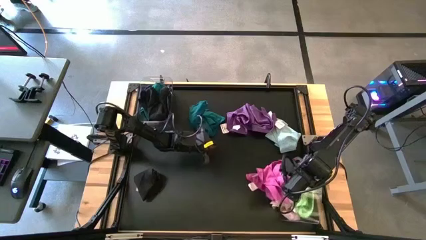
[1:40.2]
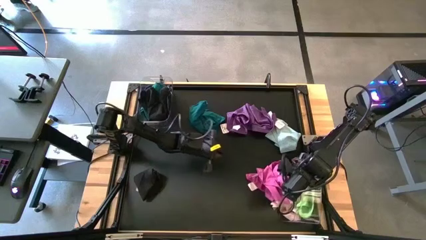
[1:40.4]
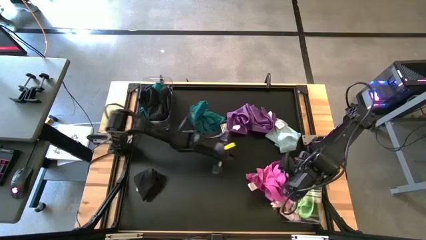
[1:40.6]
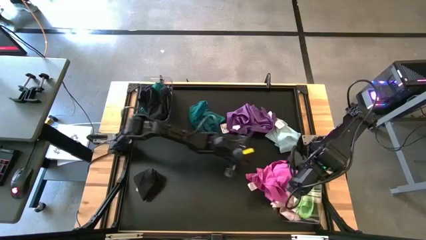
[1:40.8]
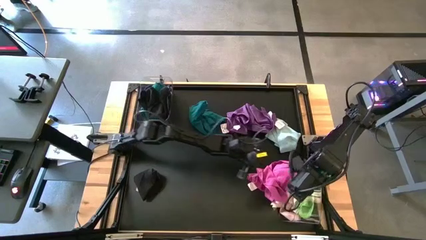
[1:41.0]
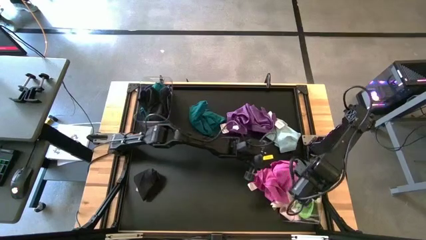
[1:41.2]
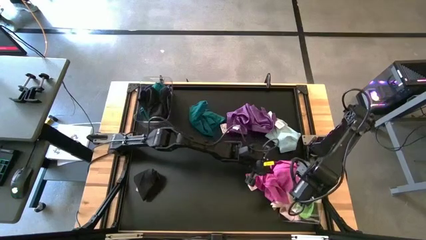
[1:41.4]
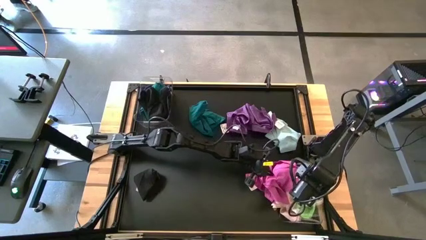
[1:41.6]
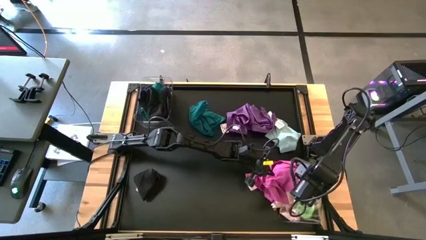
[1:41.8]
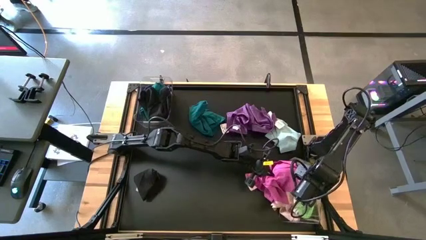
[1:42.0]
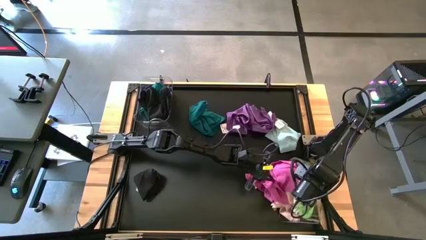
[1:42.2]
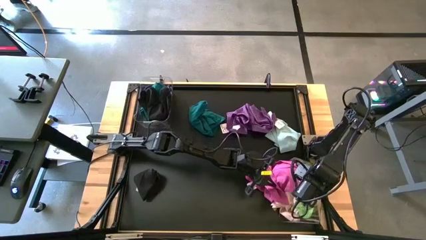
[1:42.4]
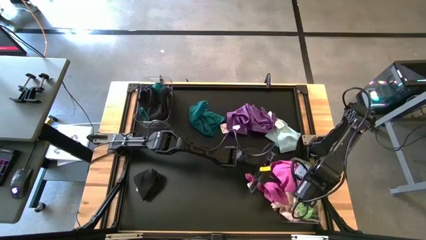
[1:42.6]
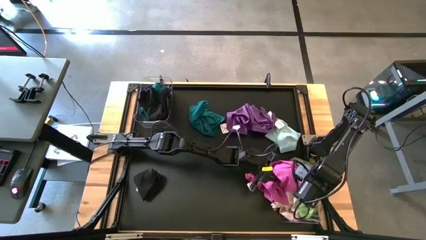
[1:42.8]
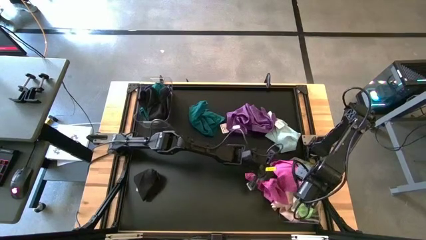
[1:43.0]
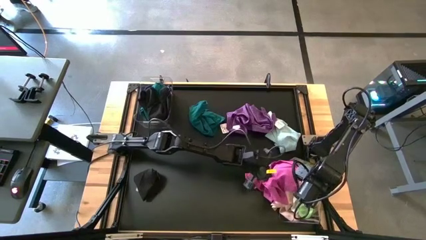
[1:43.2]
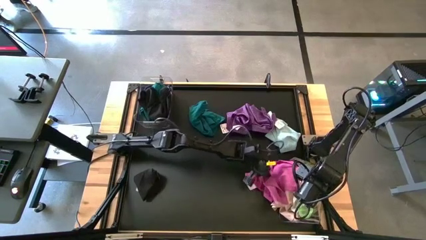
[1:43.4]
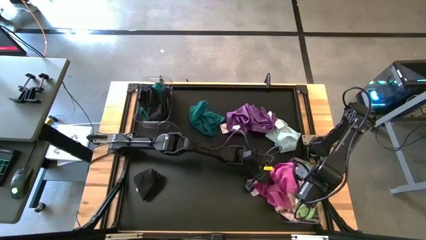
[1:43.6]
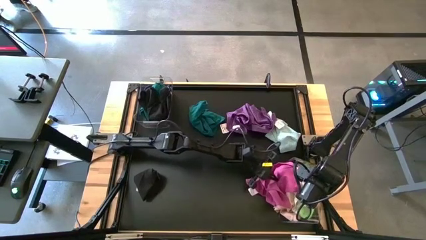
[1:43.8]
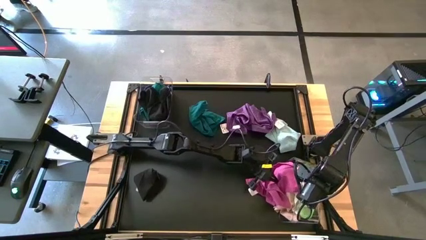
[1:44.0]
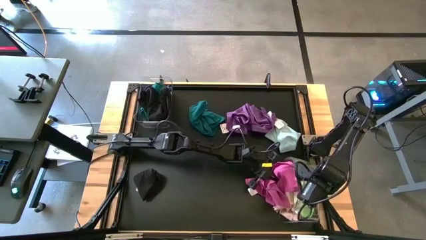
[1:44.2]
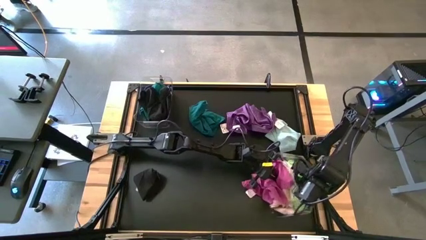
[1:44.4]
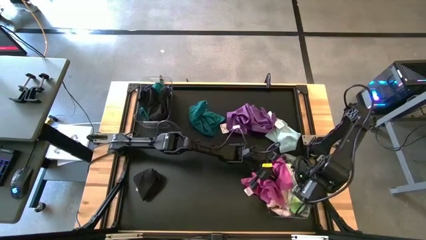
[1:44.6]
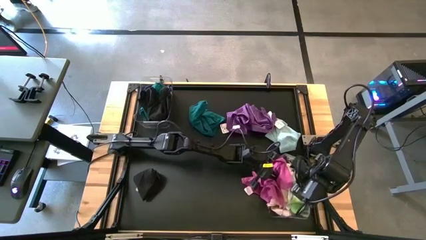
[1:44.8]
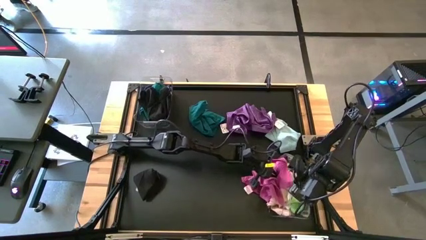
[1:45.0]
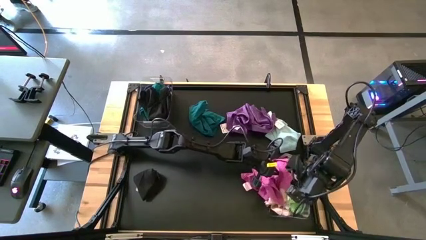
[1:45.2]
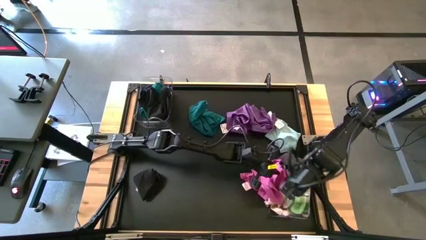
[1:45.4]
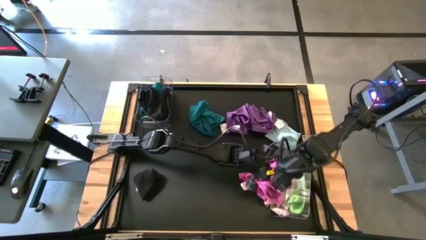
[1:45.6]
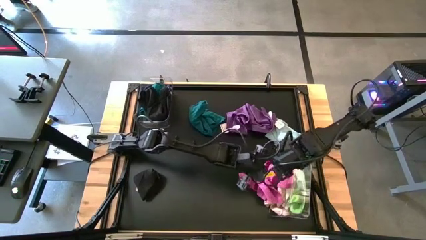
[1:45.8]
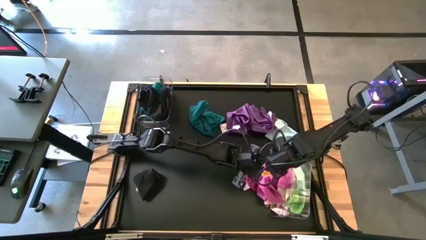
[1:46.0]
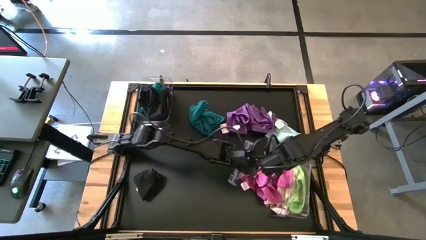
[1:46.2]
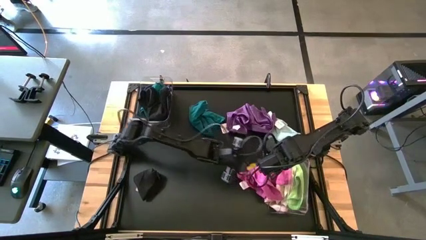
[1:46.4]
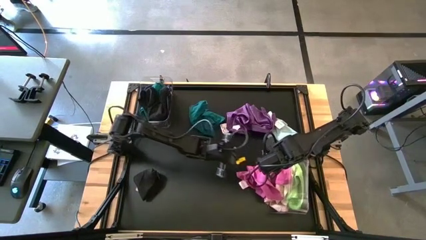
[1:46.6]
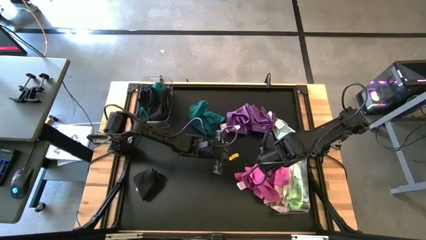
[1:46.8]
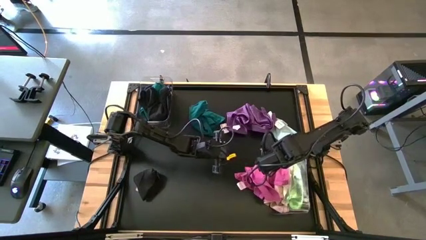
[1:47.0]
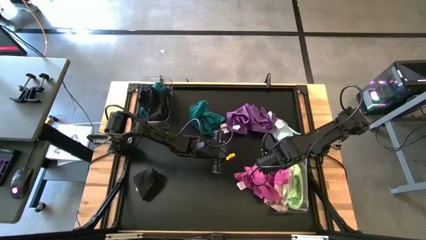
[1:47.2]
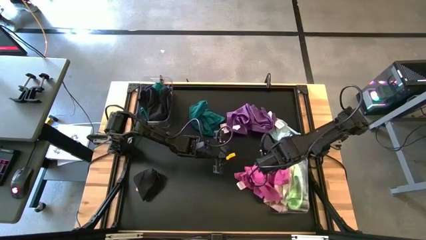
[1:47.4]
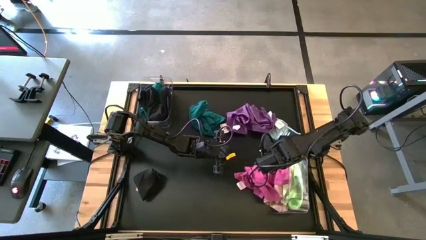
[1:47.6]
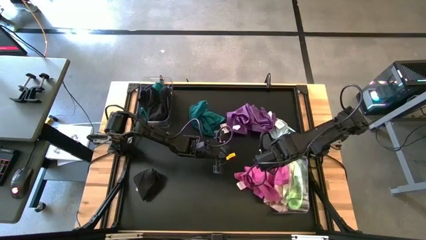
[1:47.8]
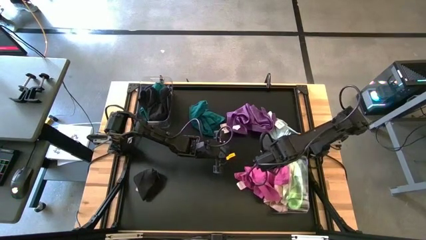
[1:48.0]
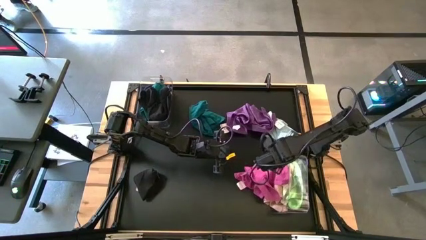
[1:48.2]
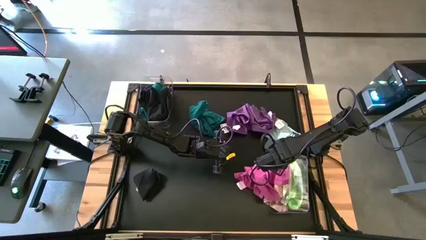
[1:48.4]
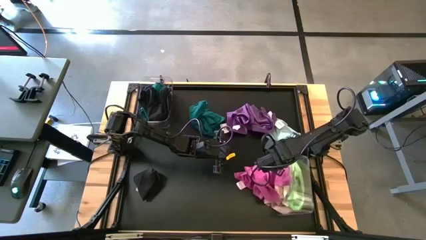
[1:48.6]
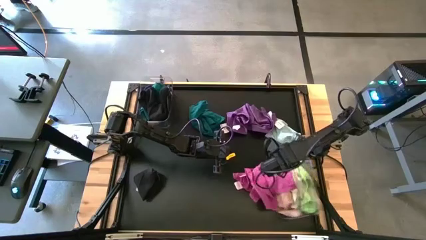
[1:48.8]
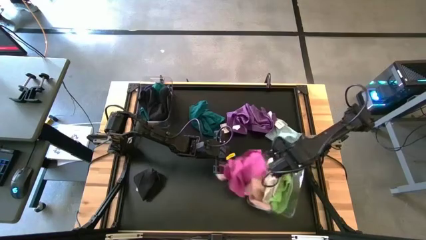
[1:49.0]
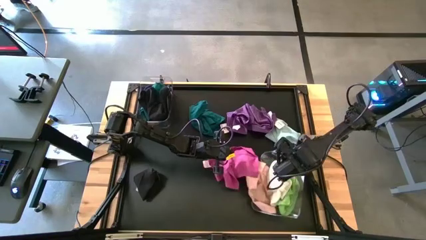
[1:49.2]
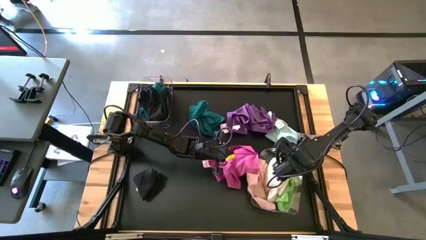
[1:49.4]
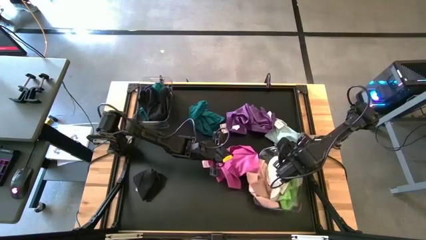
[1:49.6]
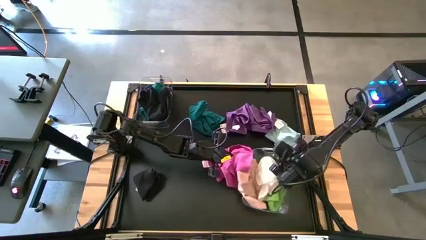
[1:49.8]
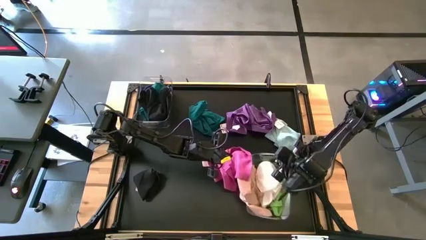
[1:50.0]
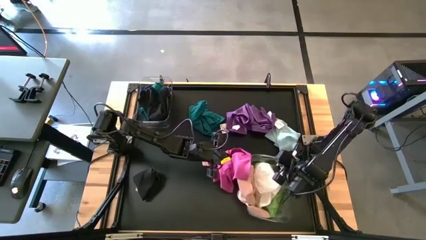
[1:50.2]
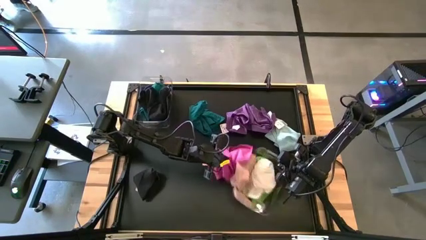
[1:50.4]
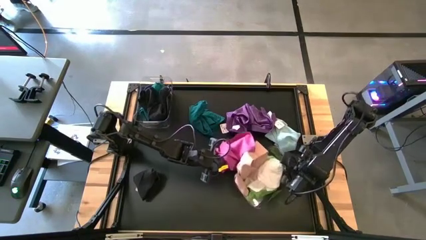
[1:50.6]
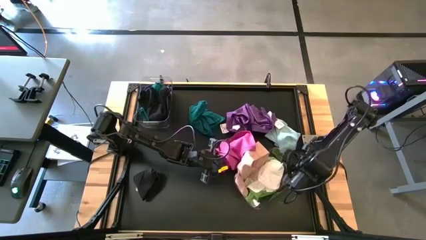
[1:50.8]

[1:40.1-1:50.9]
Task: Sort towels by color in basket
Adjust the bottom transparent bin

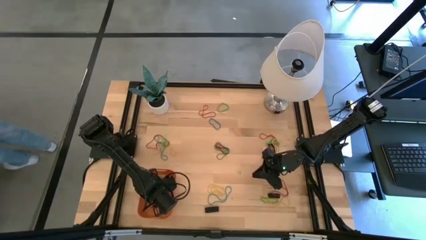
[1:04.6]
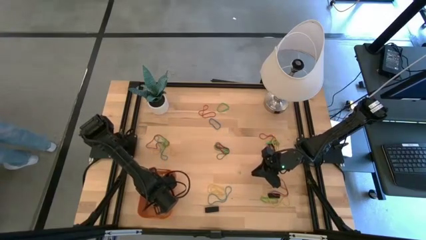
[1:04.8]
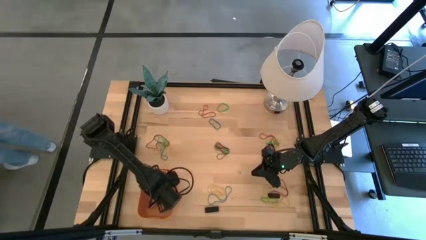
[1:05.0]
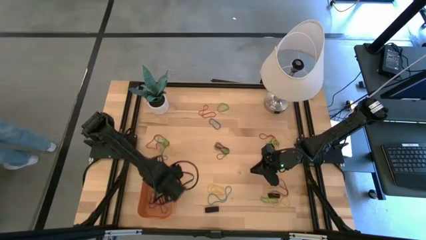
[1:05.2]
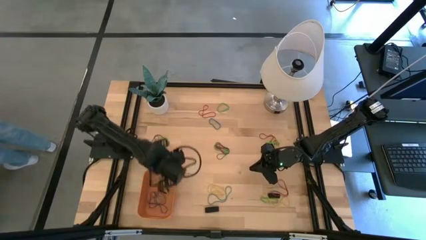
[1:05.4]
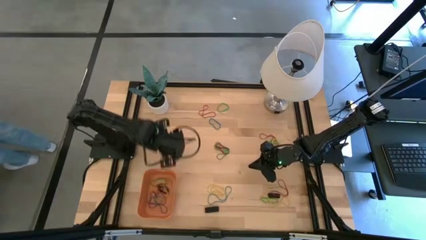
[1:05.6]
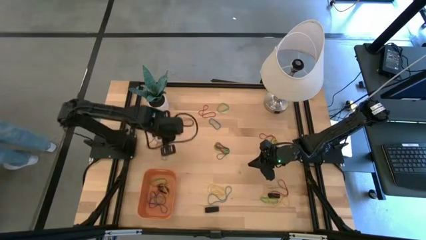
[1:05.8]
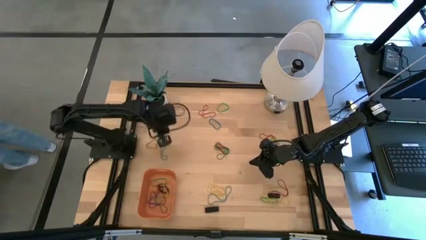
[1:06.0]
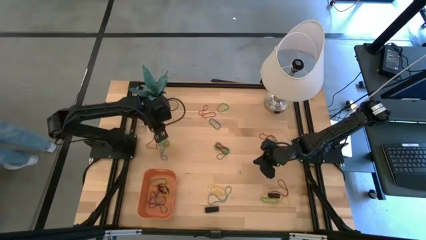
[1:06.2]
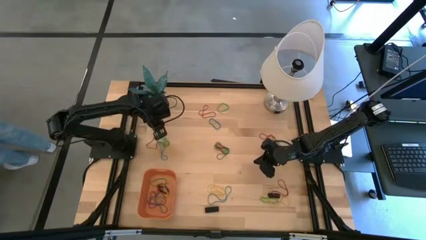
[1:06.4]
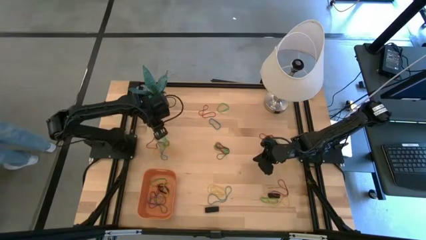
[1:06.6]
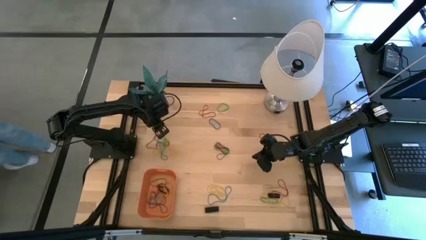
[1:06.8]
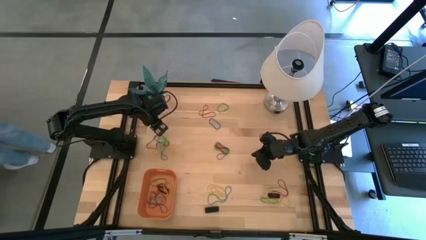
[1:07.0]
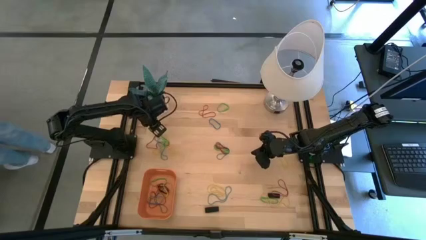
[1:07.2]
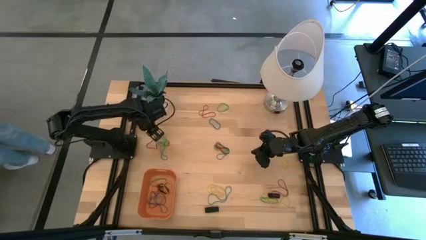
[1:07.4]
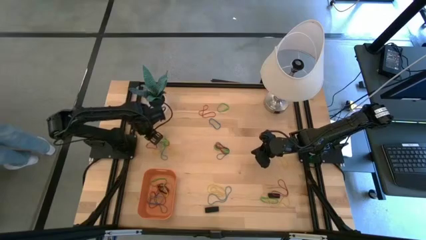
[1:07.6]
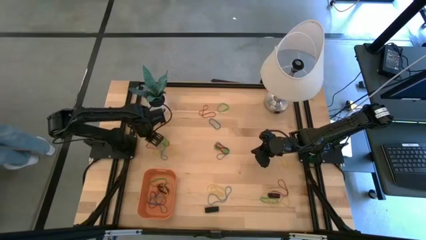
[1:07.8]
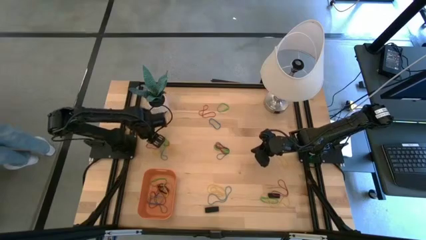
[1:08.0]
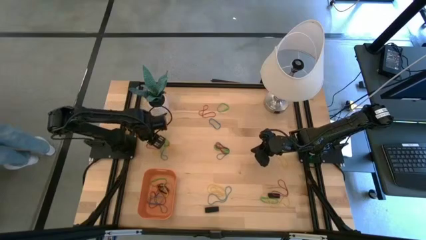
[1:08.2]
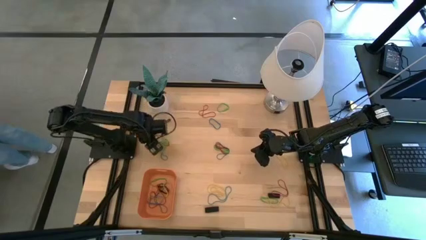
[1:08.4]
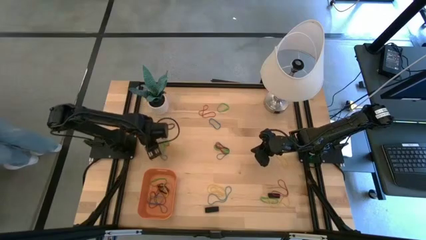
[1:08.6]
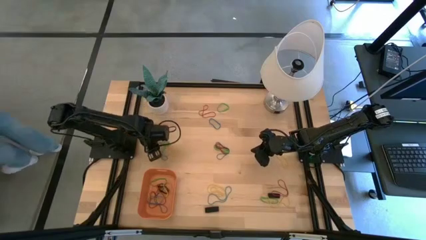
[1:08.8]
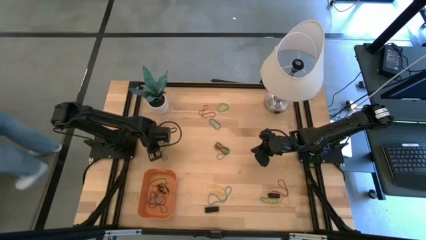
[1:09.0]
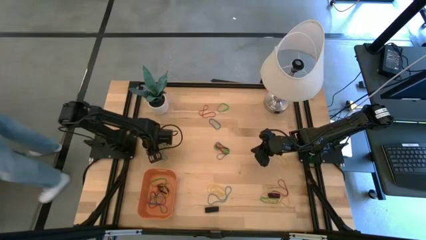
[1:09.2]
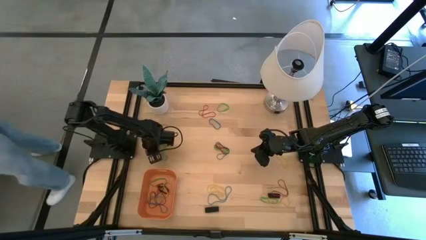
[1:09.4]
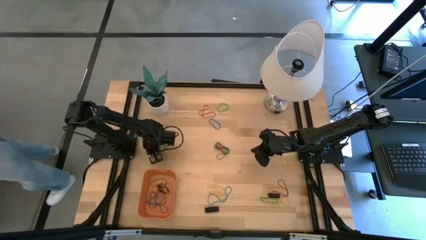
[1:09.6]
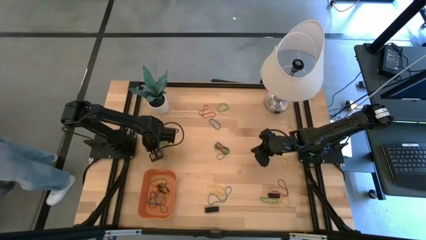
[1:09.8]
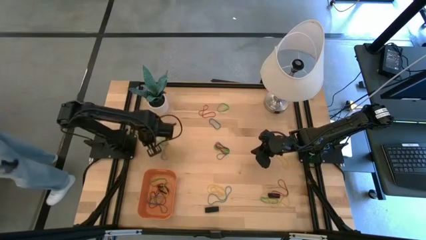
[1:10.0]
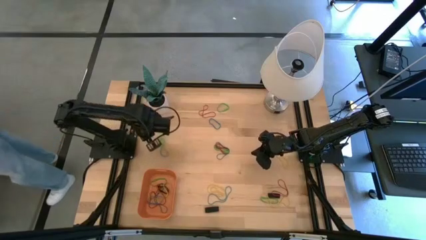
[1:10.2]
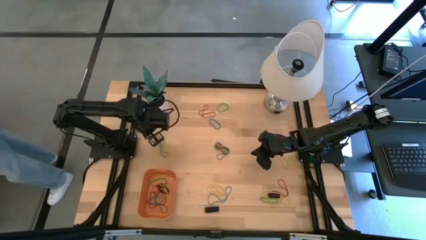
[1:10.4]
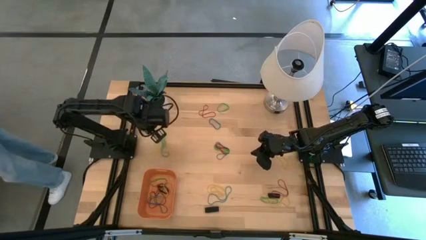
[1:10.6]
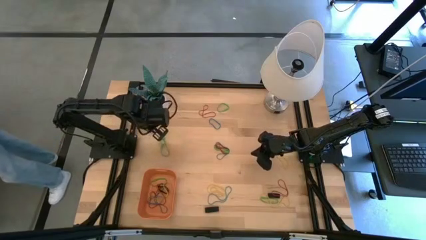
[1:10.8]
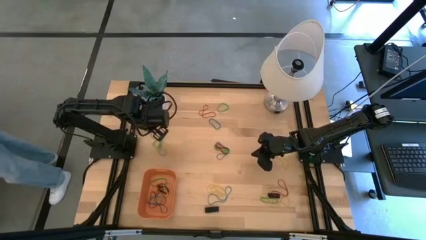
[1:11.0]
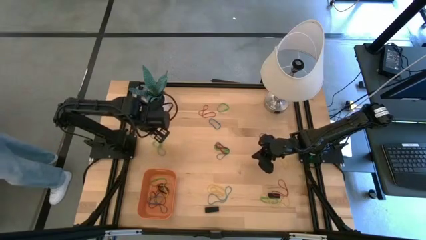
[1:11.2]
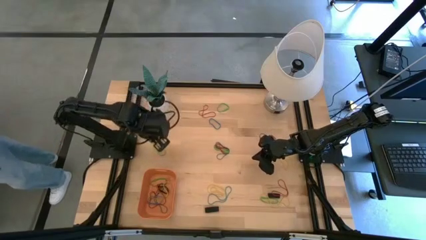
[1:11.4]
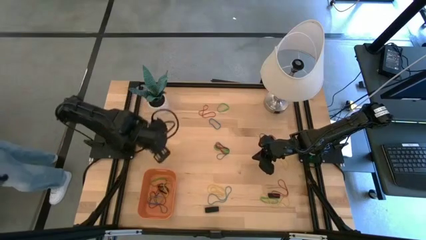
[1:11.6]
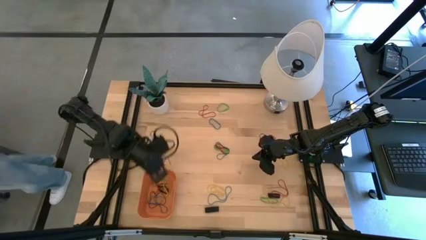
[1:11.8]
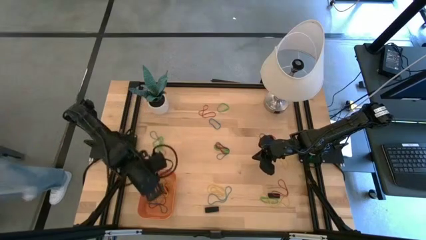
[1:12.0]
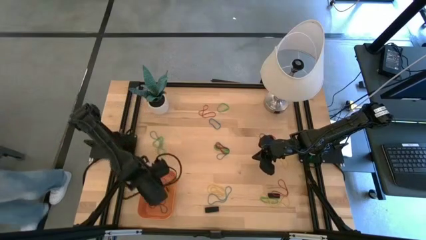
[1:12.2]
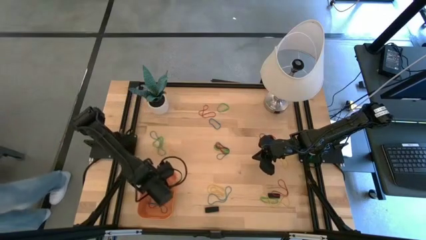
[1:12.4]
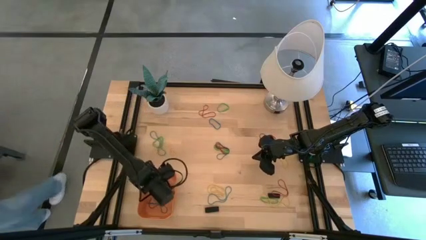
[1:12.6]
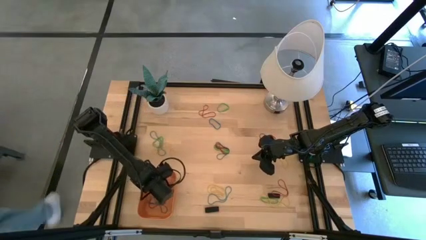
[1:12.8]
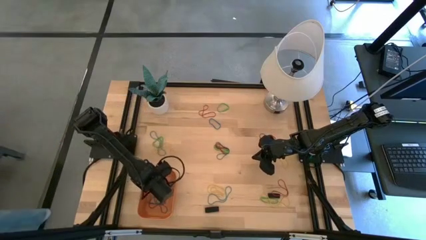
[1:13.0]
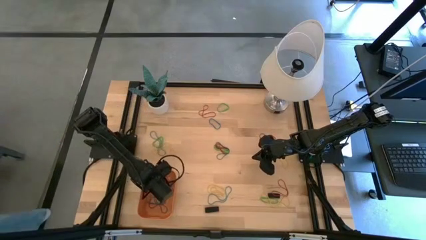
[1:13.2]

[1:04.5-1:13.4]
Task: Pick and place rubber bands into bin
Put the red rubber band into the orange bin
